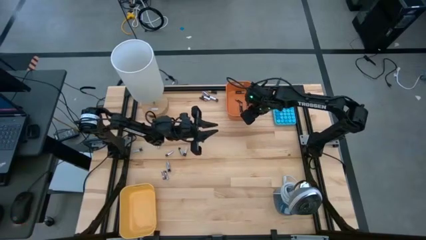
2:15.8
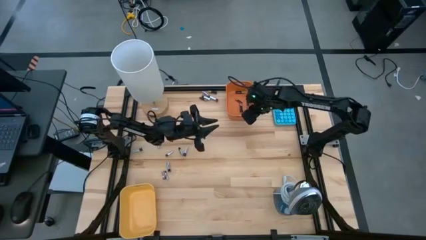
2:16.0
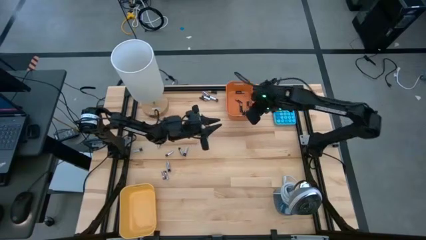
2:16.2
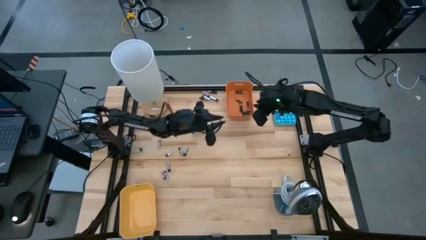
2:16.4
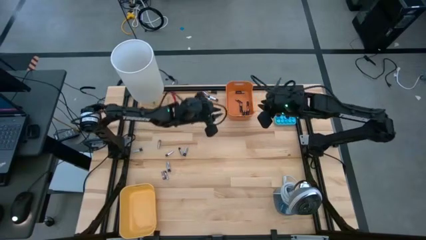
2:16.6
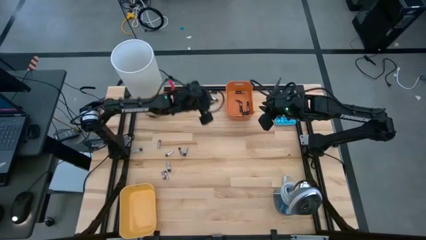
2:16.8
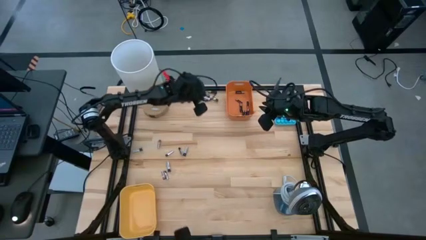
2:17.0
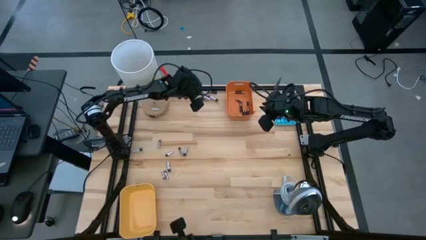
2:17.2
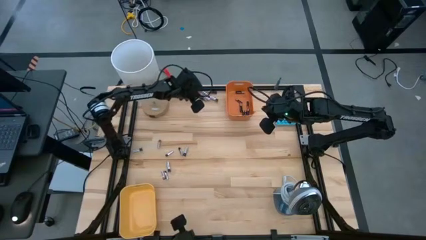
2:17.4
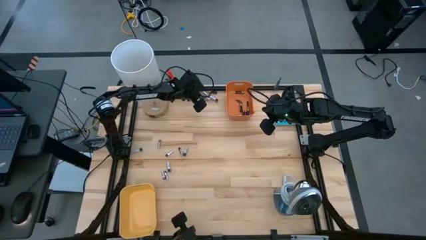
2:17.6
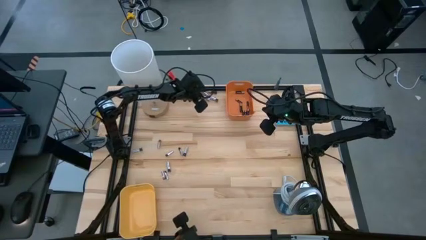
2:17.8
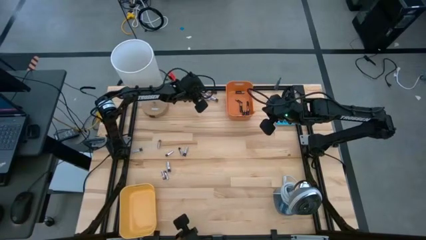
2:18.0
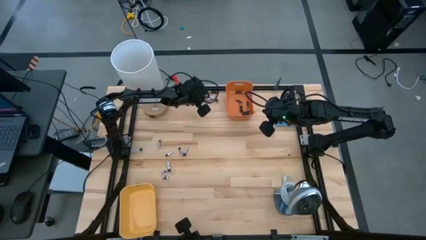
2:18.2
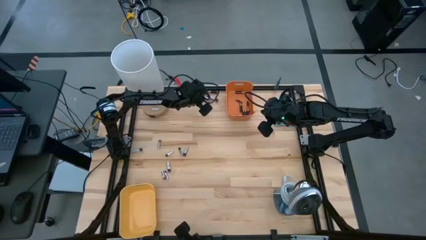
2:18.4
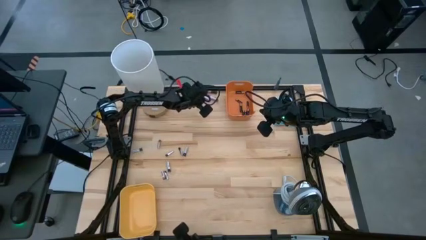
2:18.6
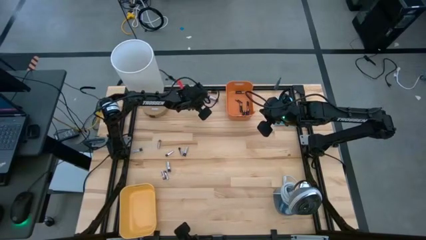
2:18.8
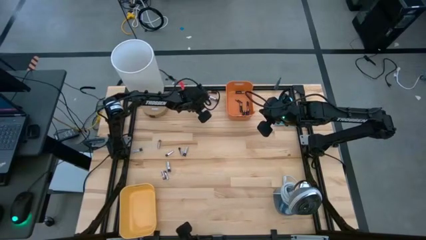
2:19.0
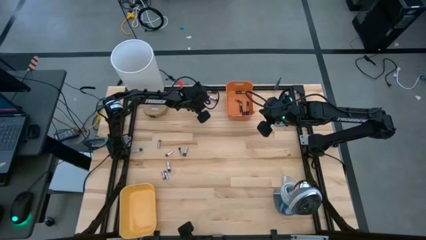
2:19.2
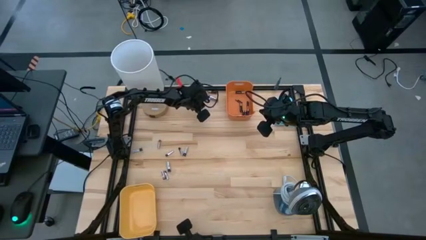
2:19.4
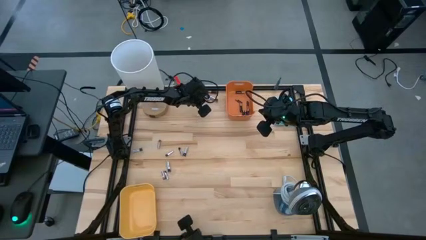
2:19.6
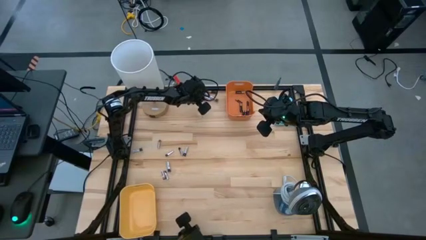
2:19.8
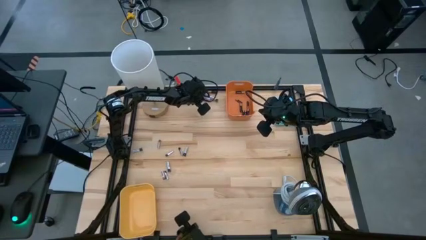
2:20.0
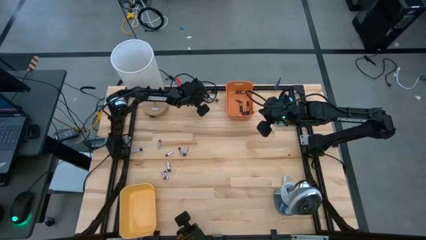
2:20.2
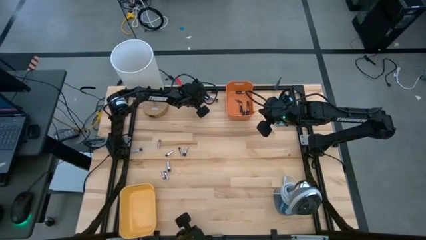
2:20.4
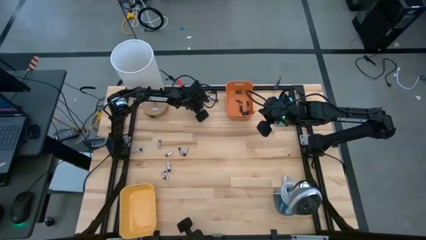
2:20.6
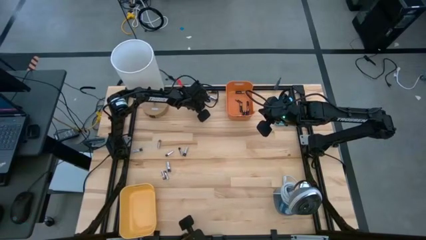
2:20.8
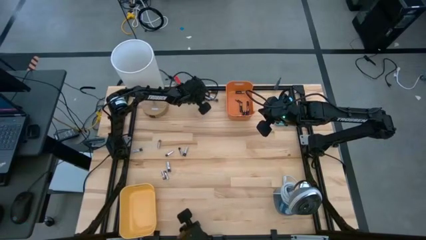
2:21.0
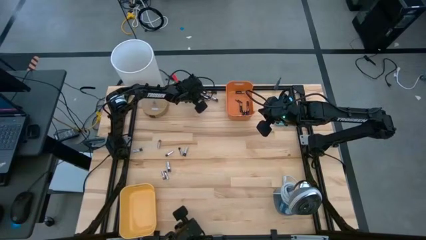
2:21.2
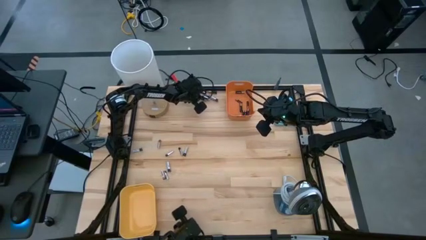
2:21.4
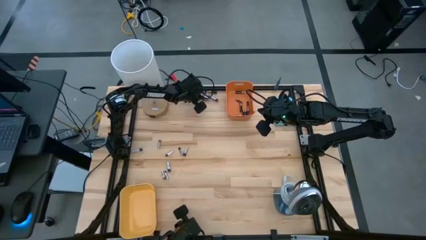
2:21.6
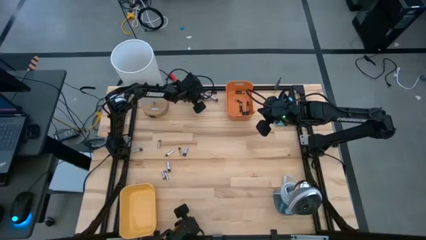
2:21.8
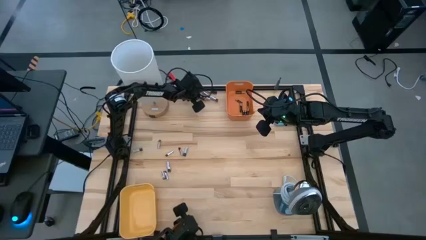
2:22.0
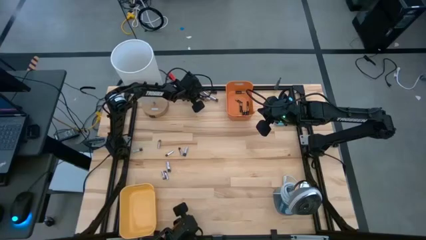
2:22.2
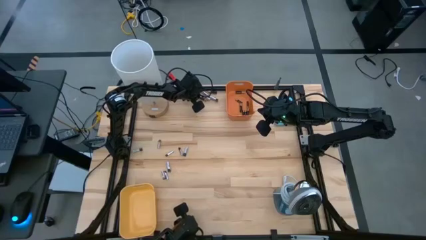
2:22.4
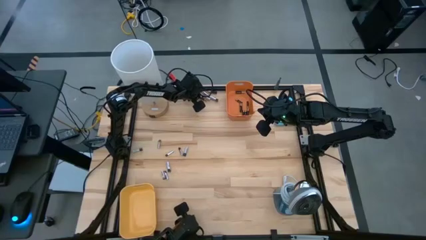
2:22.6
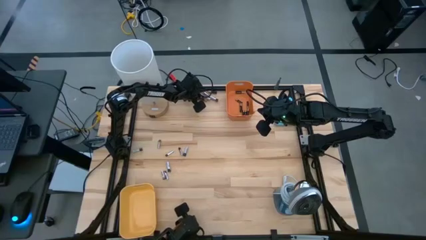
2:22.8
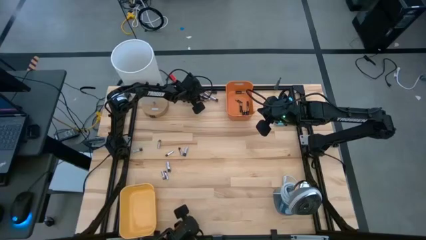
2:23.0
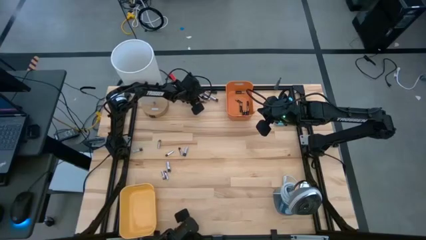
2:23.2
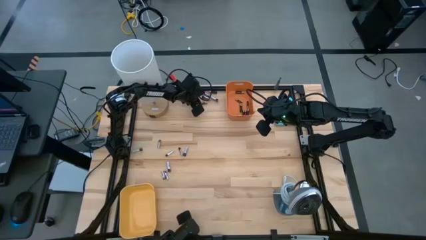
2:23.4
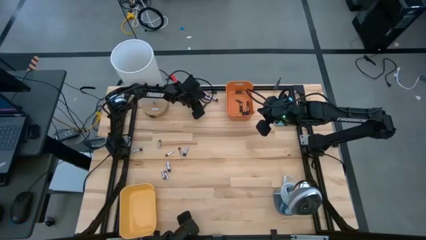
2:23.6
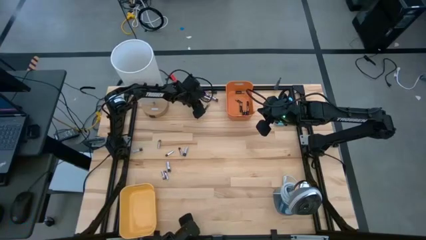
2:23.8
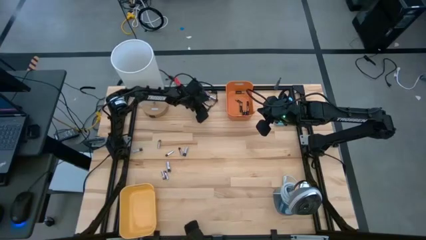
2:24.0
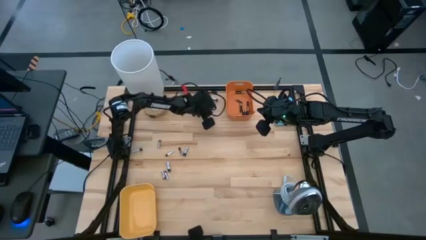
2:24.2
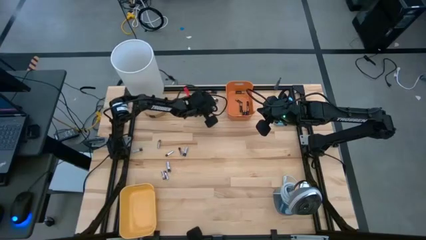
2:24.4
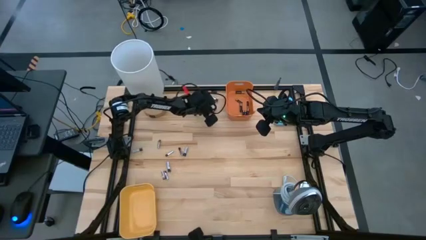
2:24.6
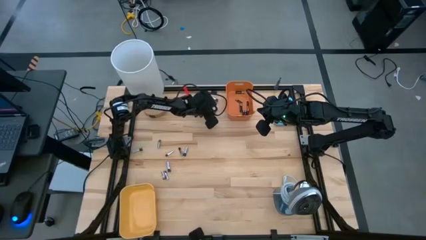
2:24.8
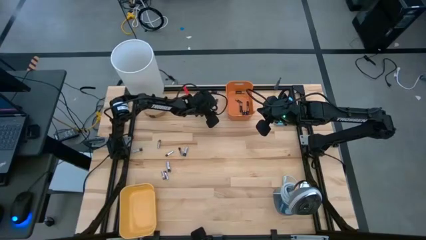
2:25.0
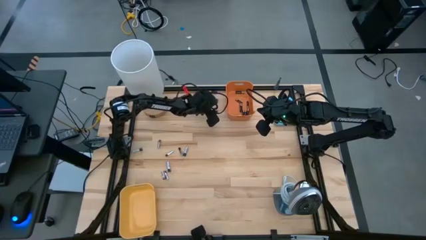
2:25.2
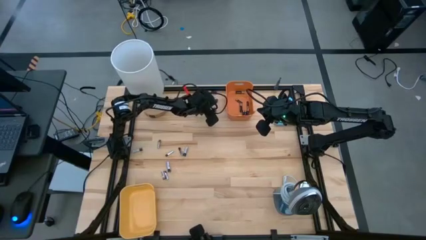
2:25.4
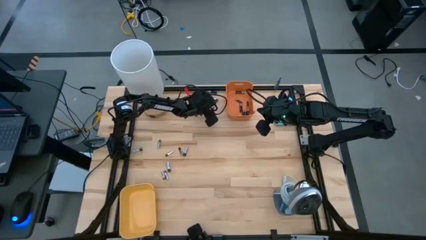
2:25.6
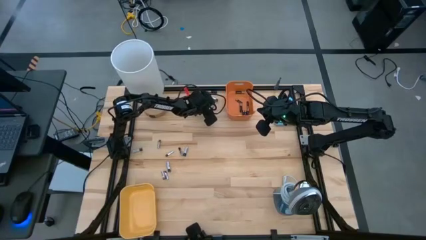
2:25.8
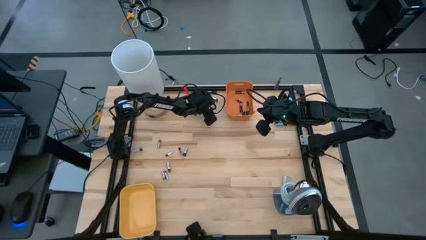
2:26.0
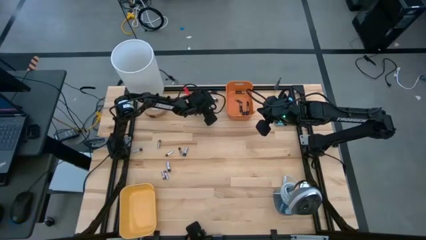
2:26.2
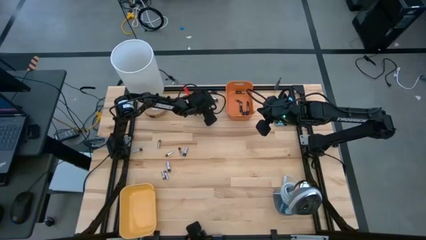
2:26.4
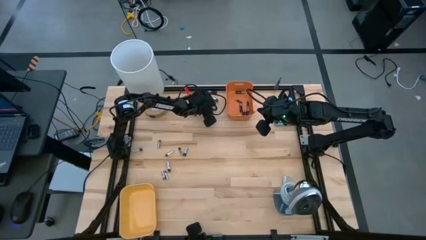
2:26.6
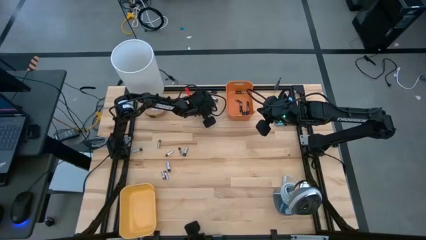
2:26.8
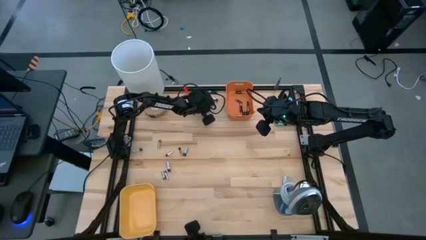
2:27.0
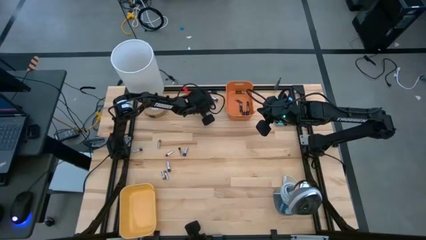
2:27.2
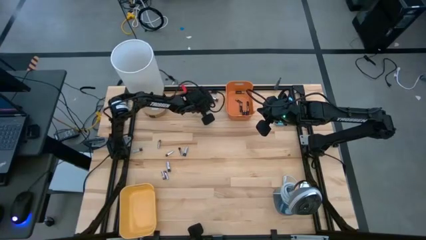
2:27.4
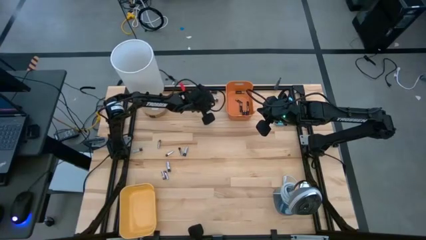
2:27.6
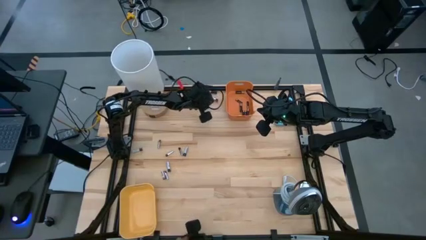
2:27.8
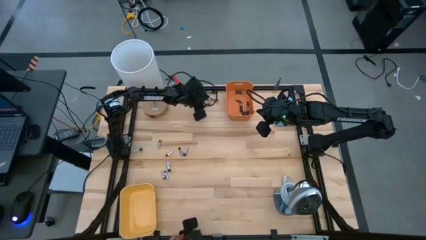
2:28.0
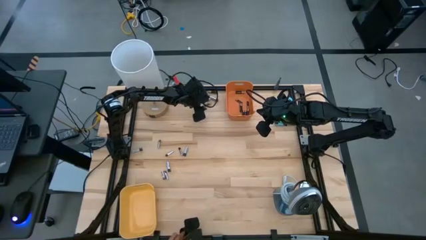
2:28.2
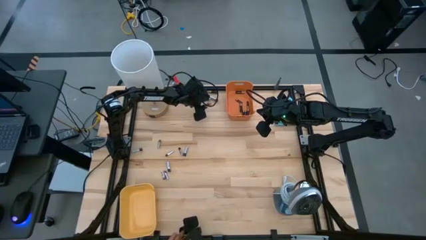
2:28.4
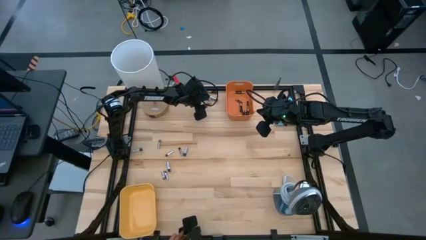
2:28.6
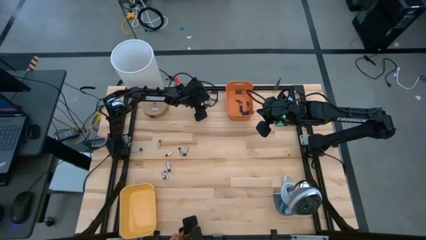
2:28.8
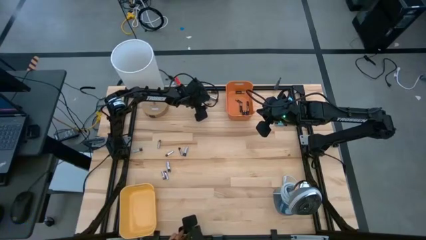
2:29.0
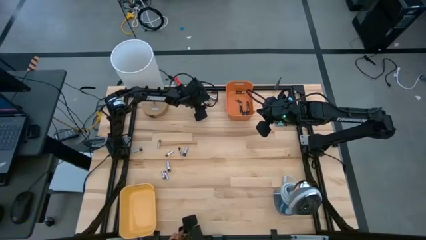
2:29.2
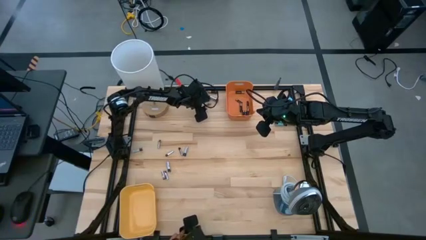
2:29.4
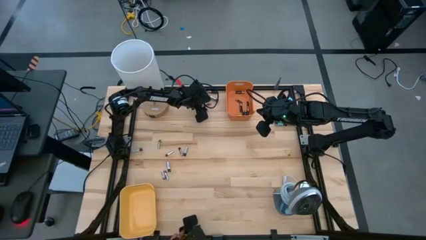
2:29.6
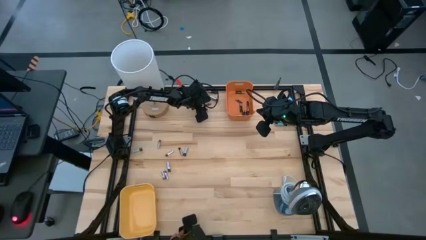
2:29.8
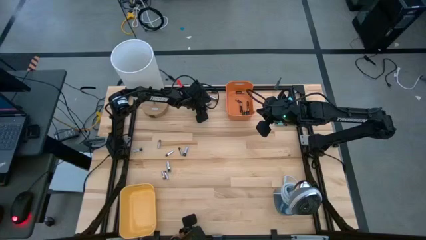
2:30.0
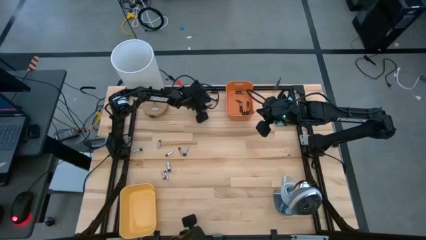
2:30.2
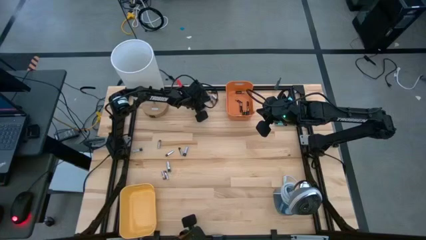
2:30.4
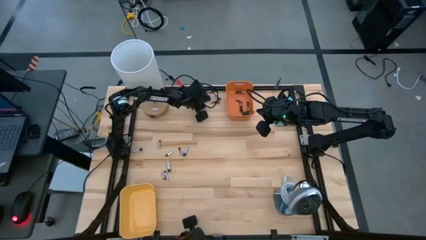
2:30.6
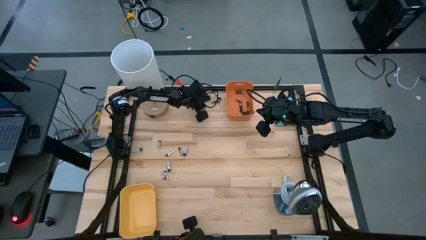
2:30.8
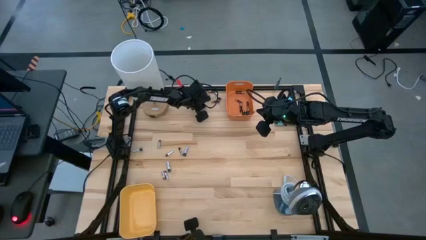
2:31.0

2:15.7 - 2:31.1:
Task: Sort batteries
Put the black battery into the orange bin
